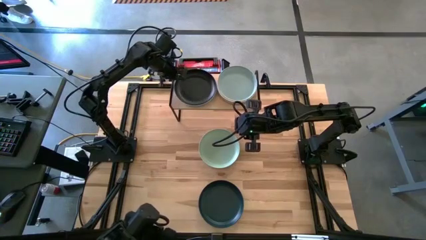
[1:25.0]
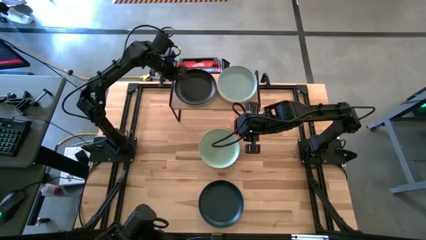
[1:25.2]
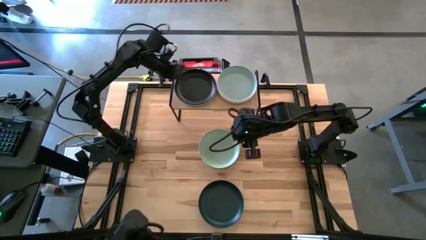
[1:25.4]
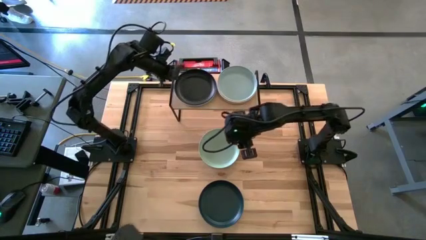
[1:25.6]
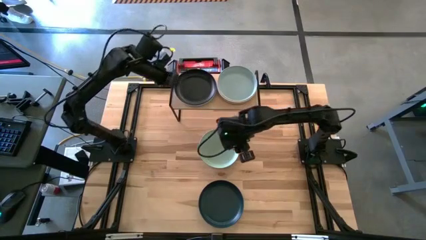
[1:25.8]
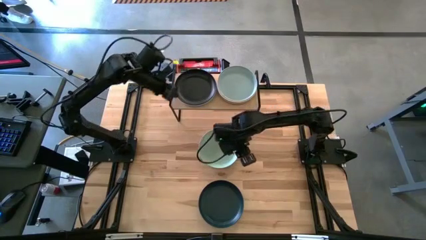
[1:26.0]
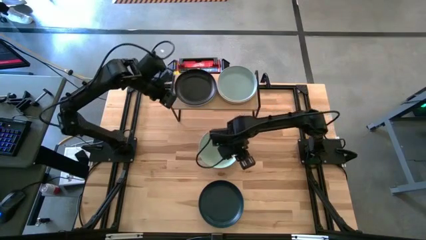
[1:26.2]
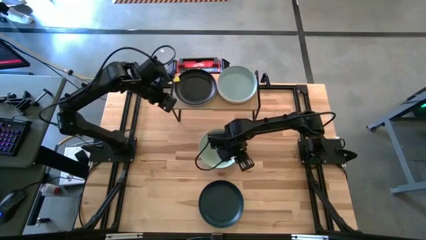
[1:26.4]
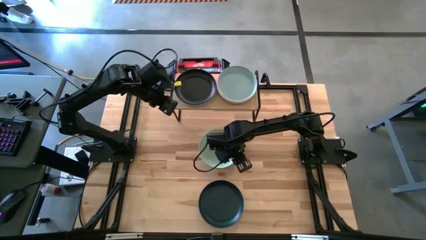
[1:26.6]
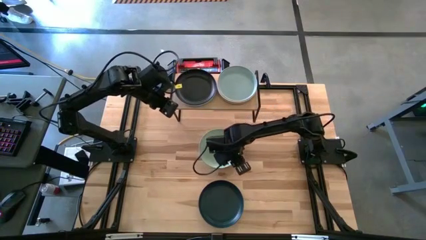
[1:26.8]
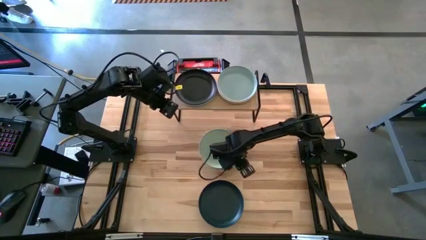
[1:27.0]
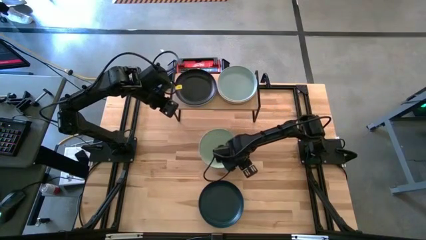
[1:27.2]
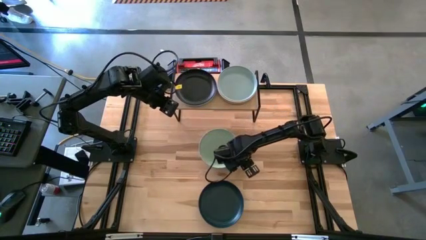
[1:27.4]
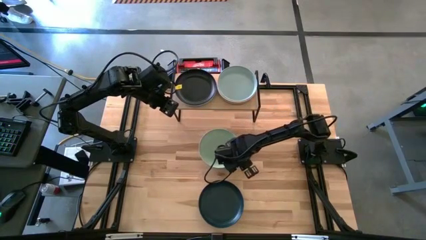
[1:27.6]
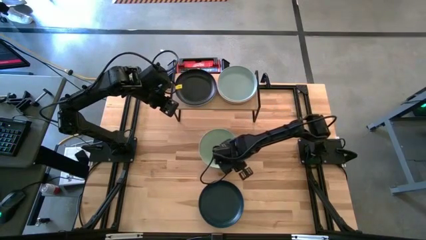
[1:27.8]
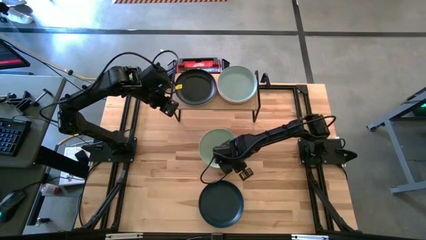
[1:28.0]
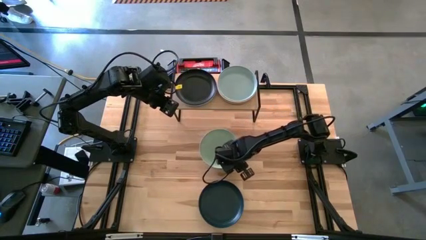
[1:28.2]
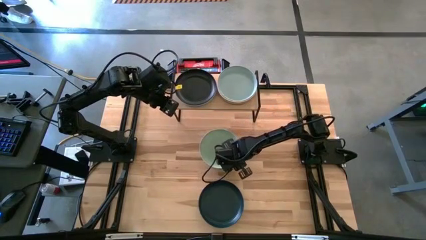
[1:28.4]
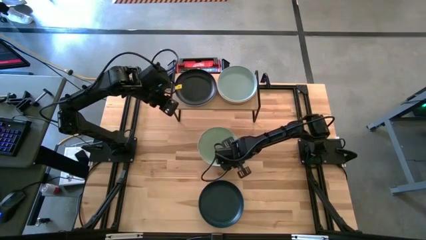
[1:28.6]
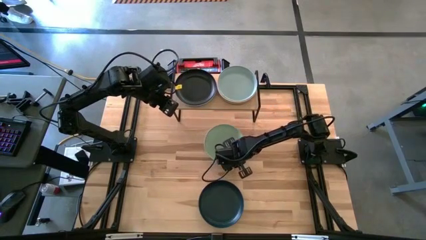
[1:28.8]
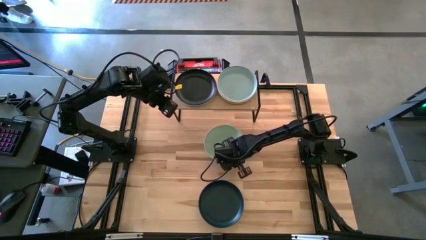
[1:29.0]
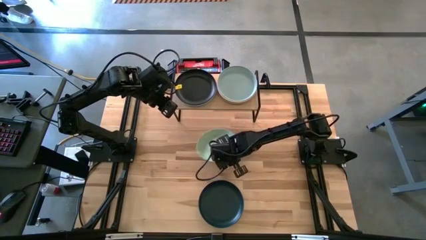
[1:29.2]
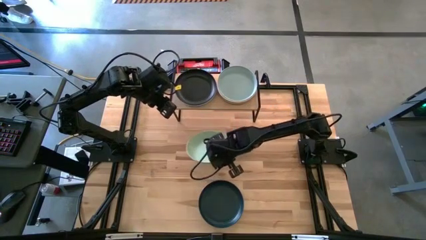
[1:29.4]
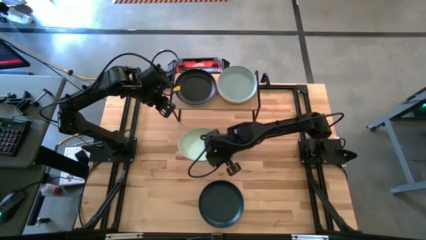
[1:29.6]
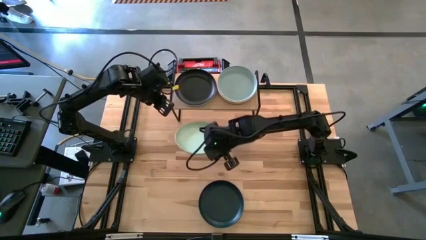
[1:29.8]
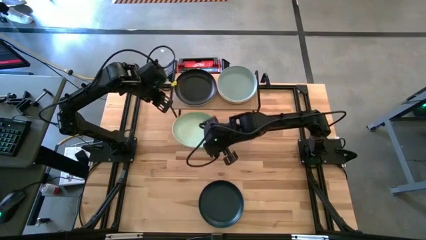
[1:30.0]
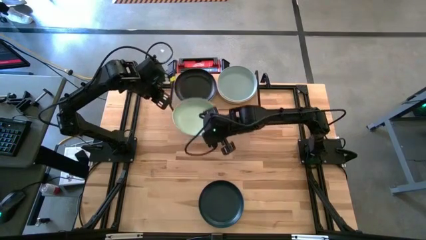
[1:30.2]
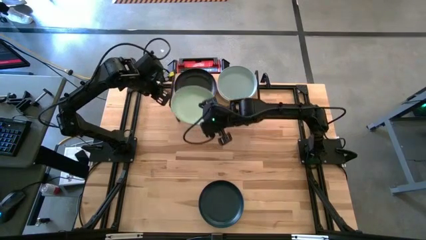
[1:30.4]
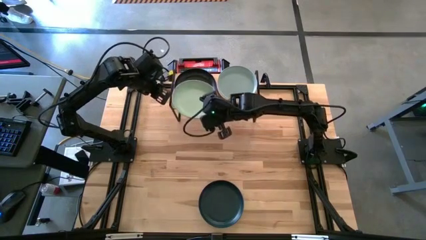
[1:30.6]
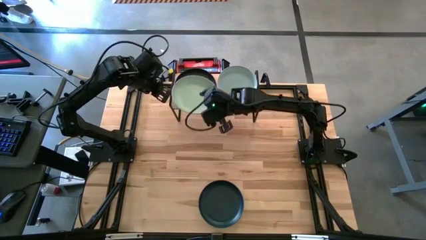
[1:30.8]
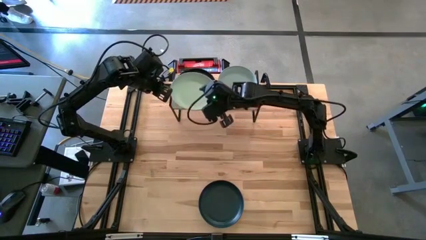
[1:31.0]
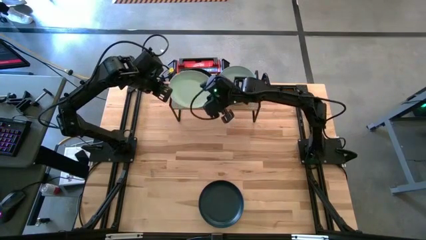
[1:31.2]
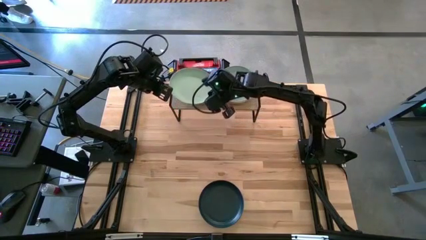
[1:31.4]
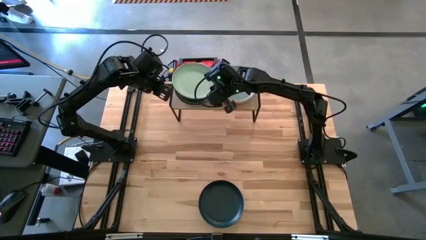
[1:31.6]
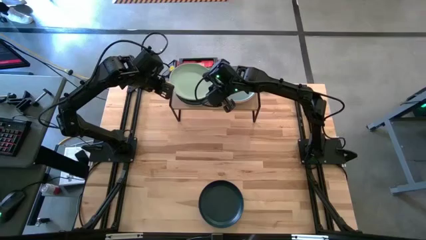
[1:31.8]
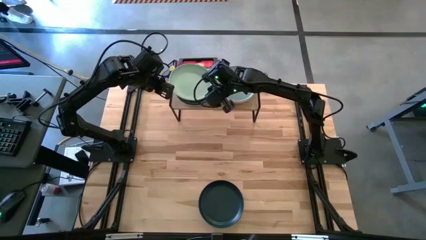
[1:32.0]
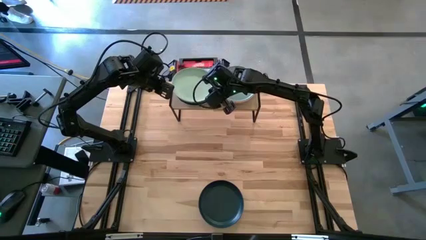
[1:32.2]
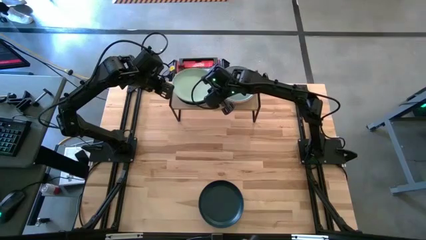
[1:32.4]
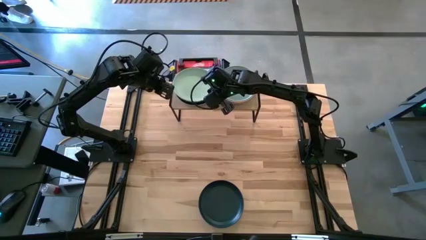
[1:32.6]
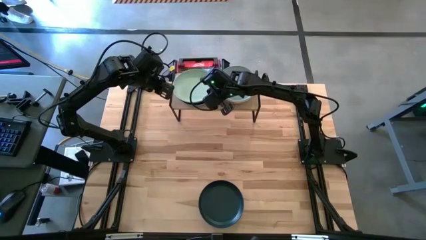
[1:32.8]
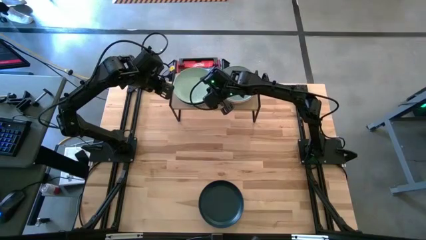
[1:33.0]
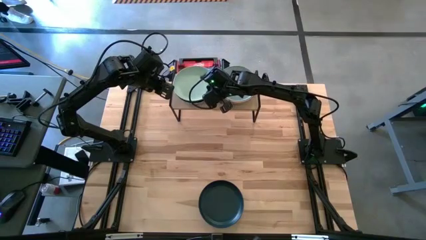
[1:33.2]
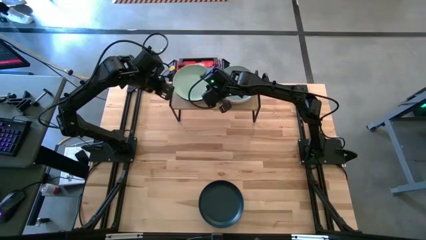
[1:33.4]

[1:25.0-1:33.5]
Task: Place and stack plates onto a shelf
Stack the light green plate on top of the black plate on the shelf

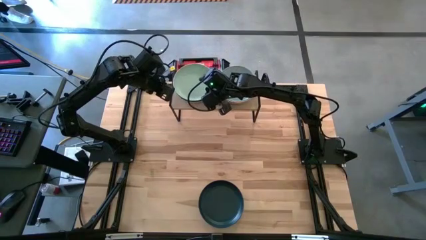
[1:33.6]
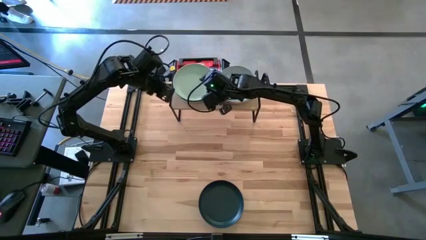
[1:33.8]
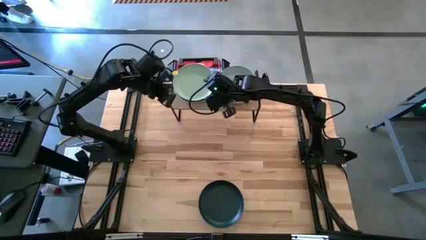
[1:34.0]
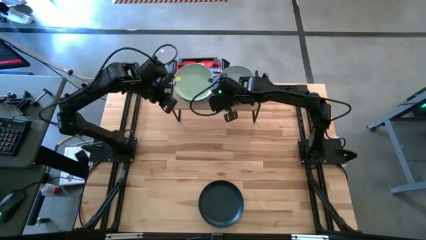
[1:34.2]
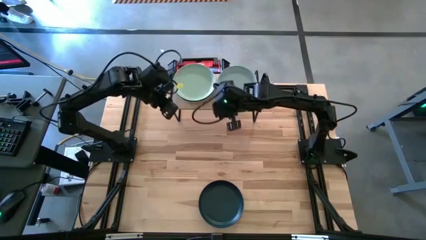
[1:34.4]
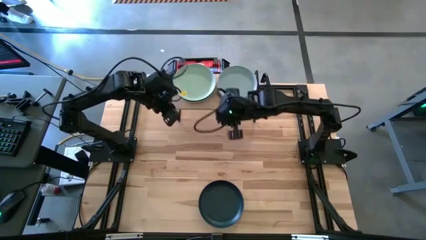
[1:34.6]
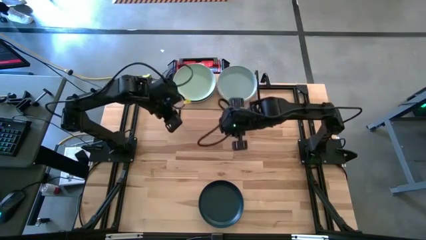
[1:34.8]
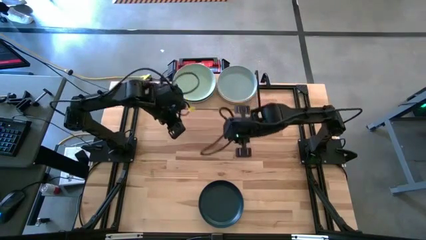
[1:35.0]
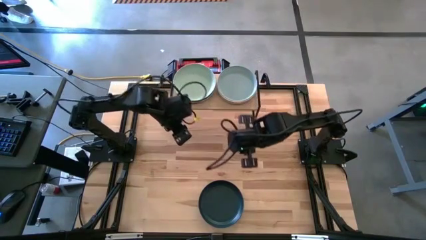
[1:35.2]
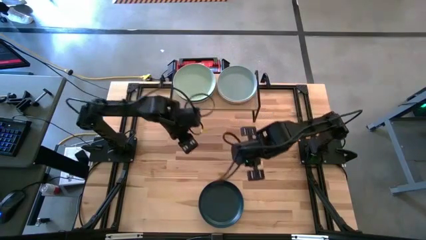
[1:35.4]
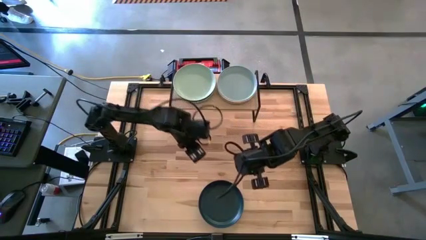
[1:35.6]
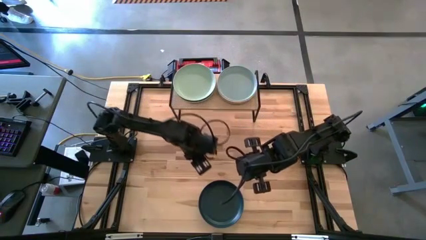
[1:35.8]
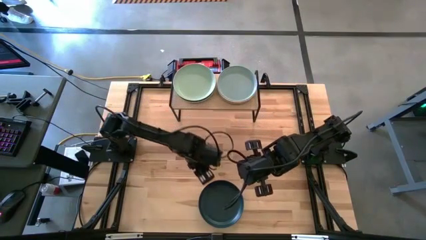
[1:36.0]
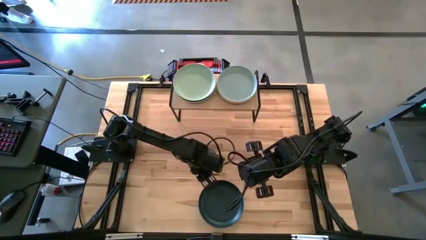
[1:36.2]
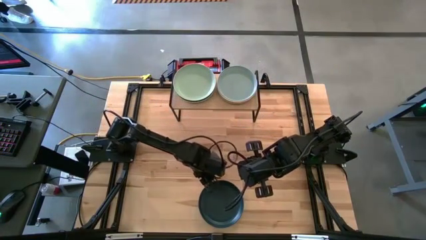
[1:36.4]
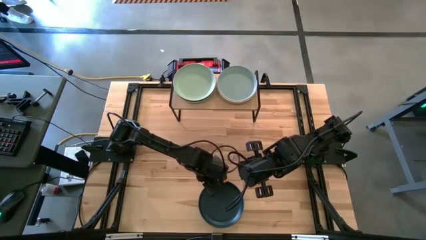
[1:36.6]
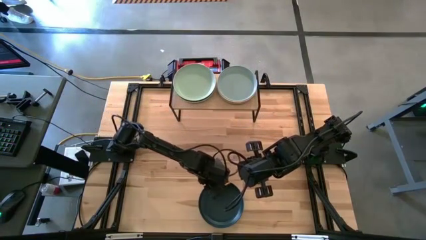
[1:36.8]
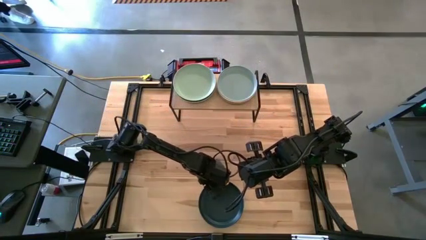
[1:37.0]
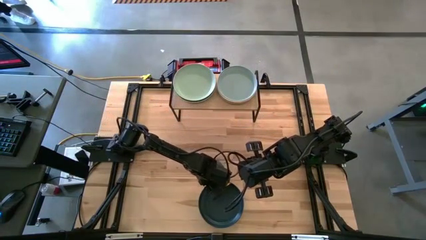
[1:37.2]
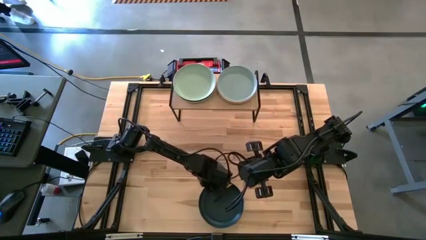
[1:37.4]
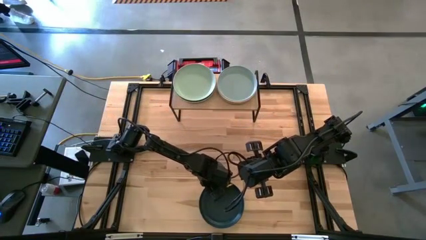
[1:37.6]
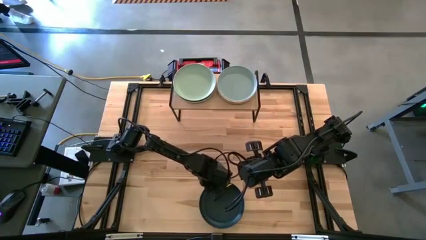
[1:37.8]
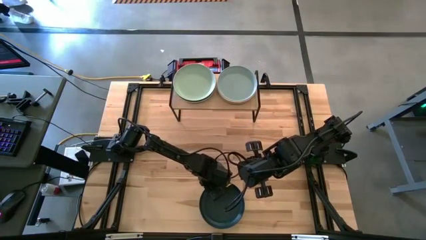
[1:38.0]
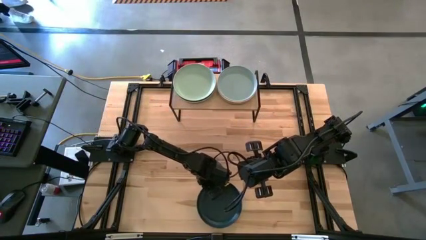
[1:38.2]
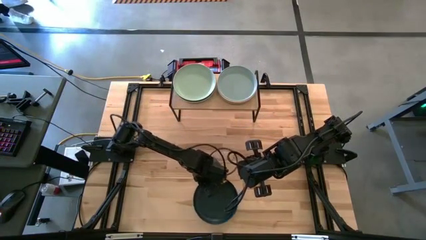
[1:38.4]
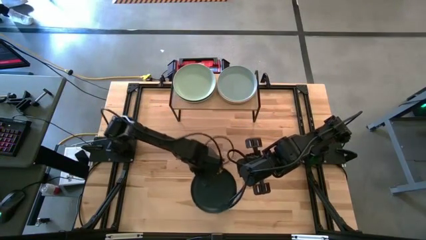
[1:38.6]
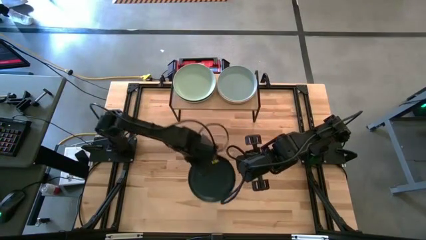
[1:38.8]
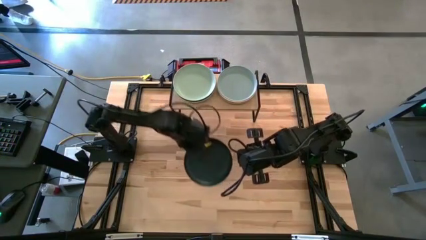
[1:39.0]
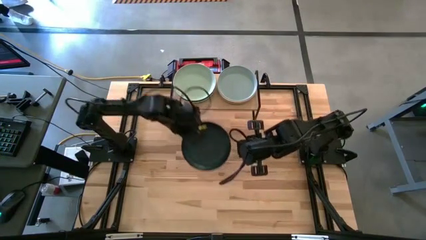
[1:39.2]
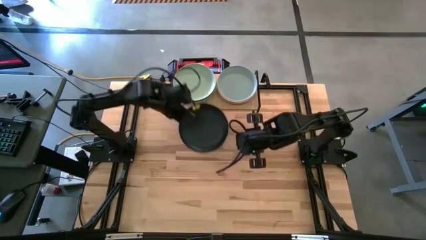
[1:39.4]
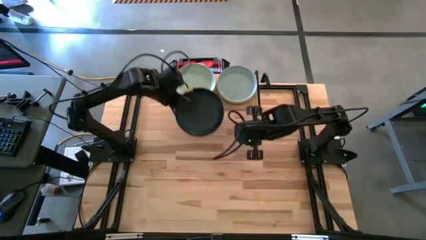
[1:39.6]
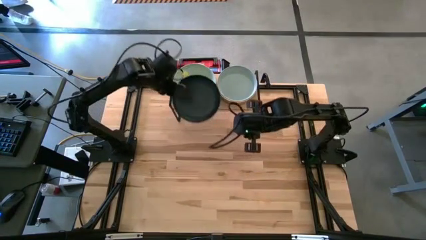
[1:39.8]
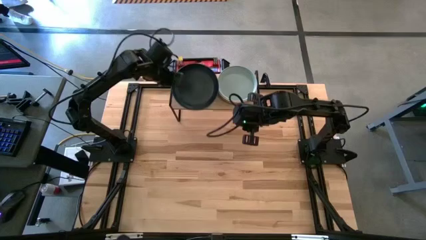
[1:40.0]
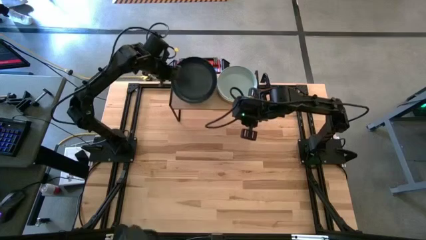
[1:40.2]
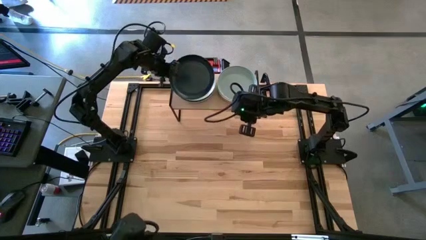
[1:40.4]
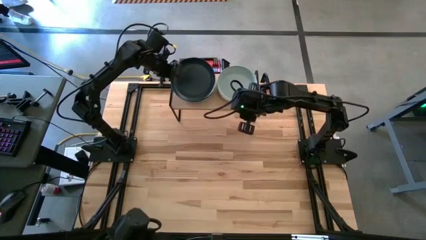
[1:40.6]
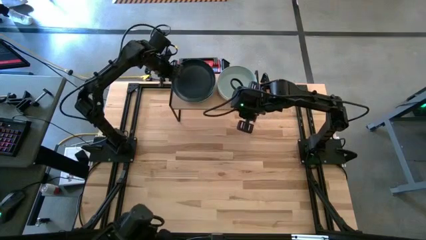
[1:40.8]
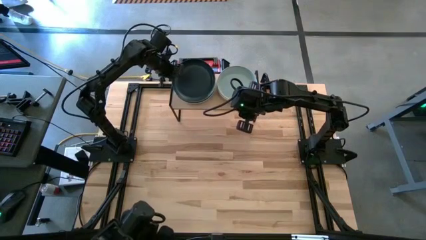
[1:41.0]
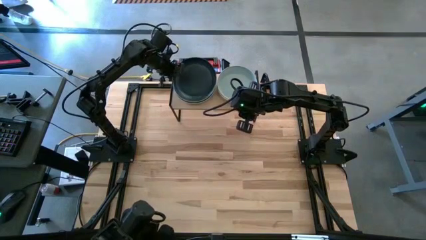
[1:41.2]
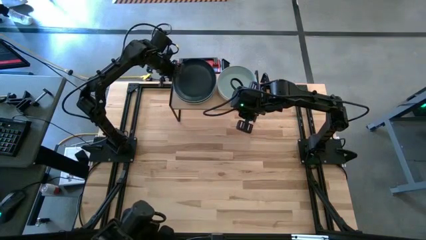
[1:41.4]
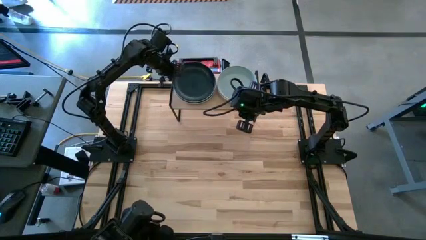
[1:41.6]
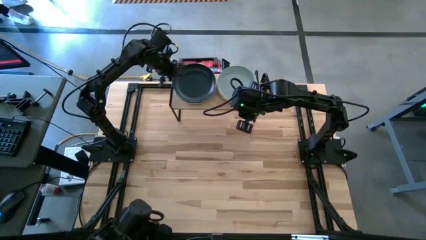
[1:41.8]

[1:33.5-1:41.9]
Stack the blue plate on top of the light green plate on the shelf

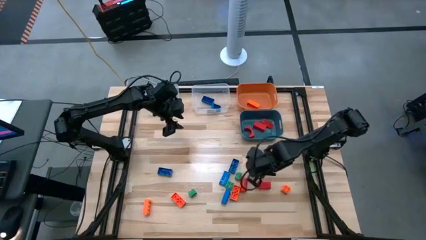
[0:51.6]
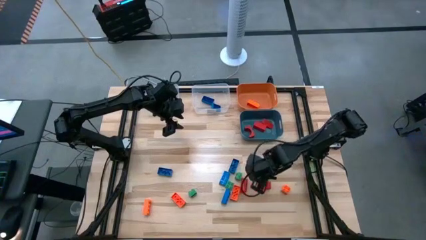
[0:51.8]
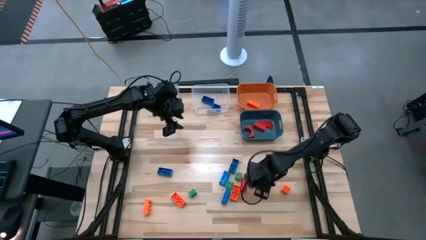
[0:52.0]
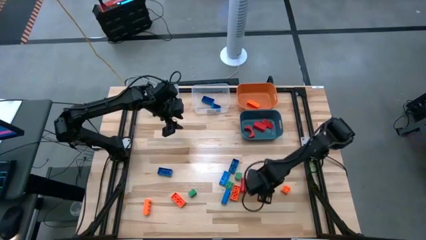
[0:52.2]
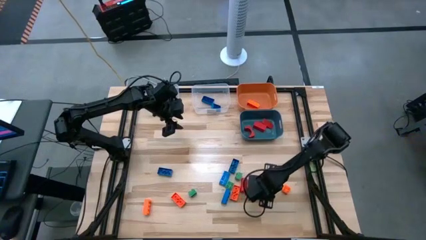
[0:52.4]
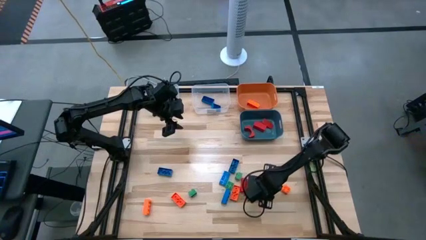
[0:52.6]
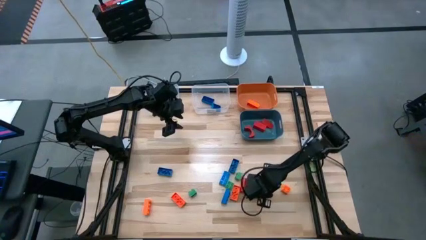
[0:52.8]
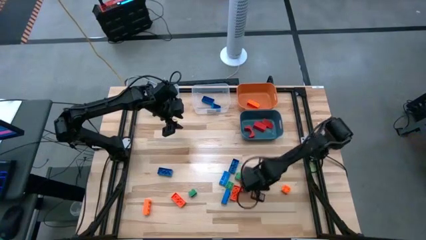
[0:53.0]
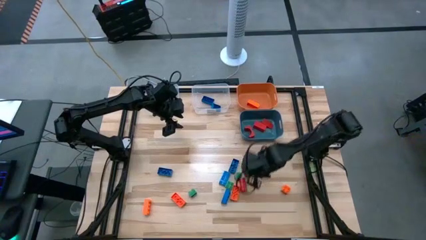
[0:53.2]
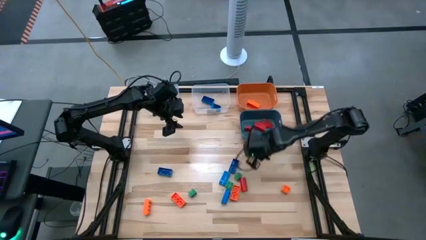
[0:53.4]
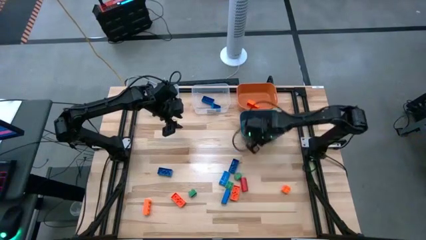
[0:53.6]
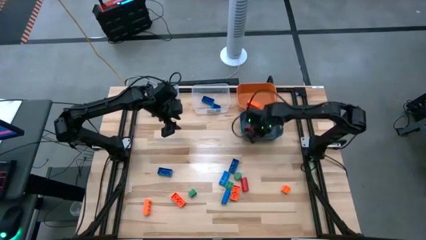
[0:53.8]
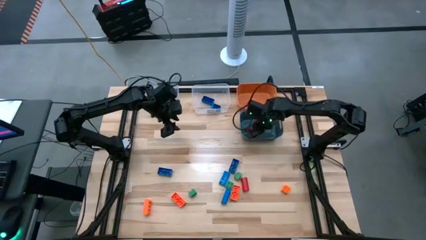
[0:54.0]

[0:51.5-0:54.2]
Task: Sort blocks
Put the red block into the blue bin
